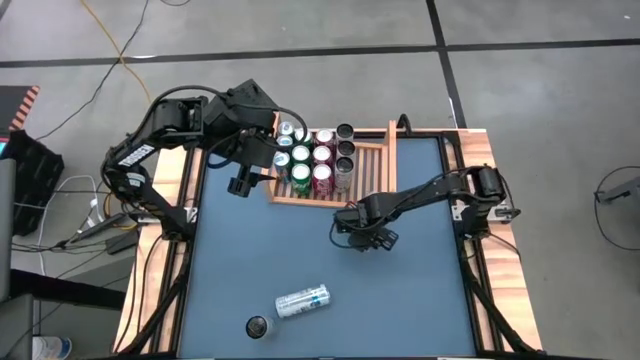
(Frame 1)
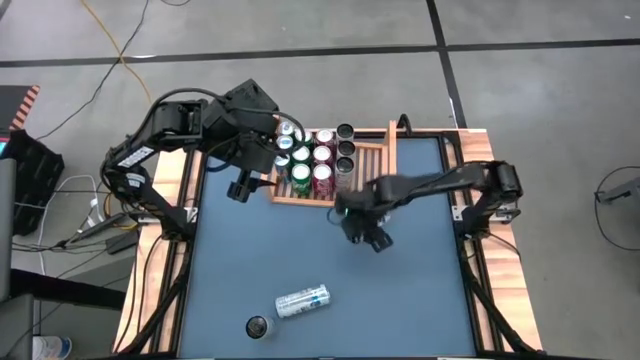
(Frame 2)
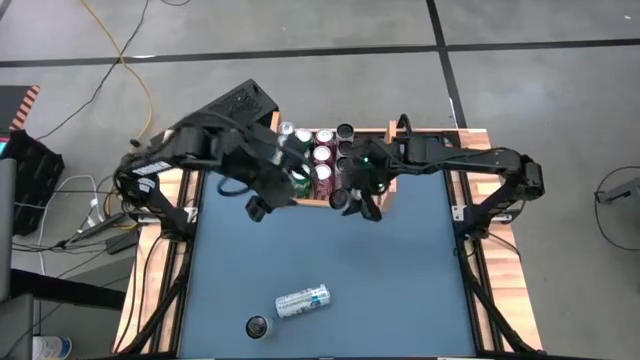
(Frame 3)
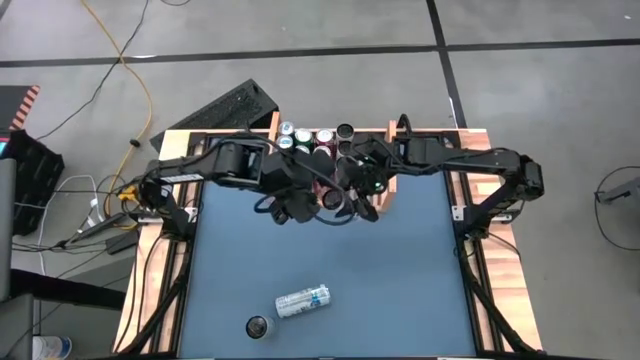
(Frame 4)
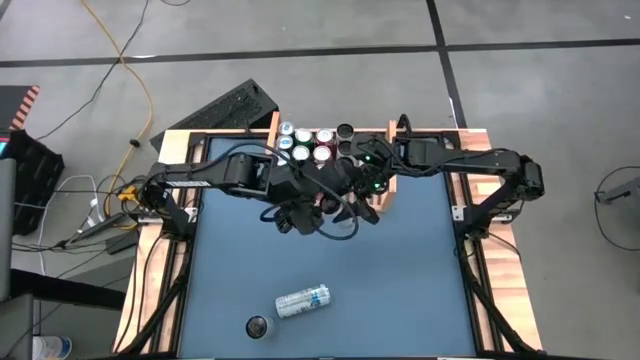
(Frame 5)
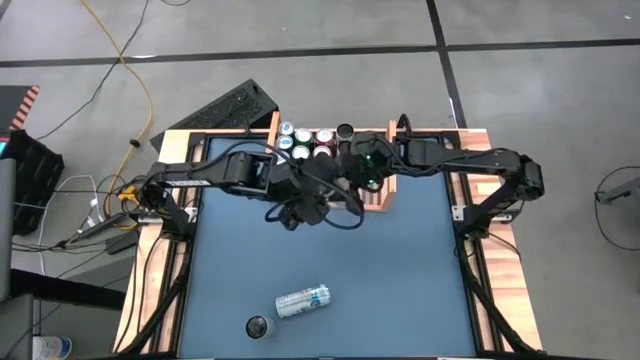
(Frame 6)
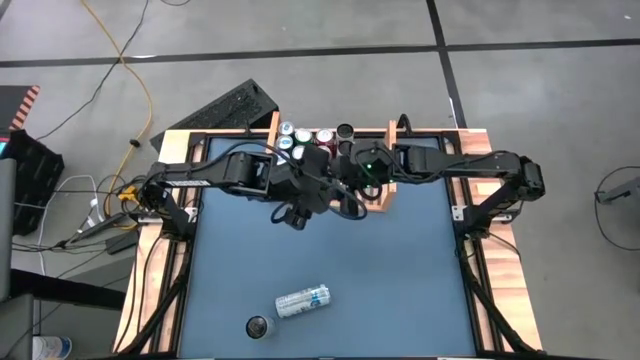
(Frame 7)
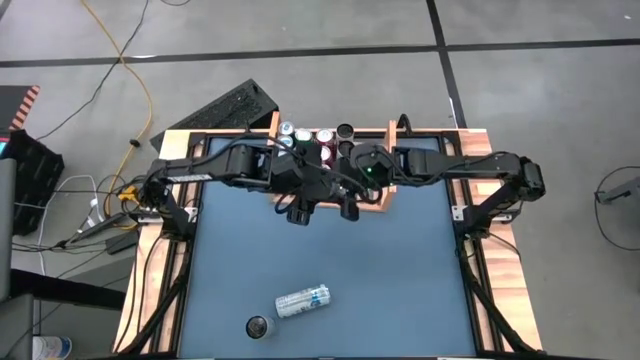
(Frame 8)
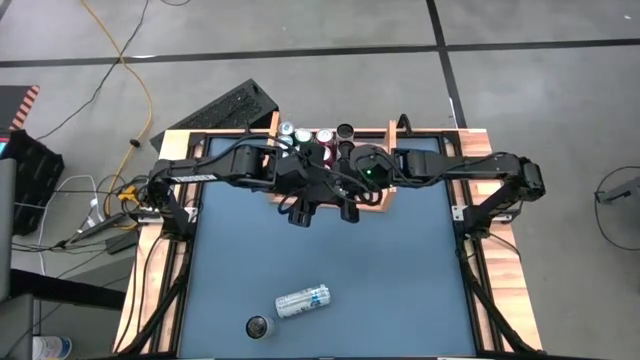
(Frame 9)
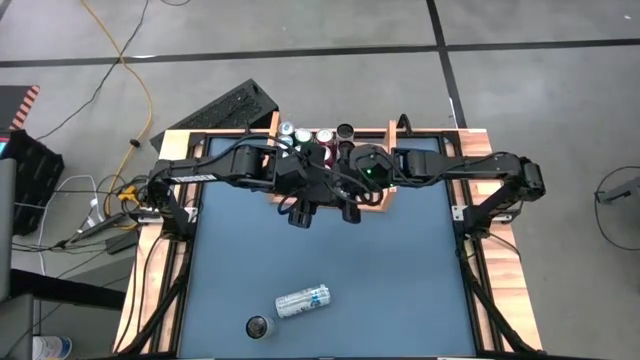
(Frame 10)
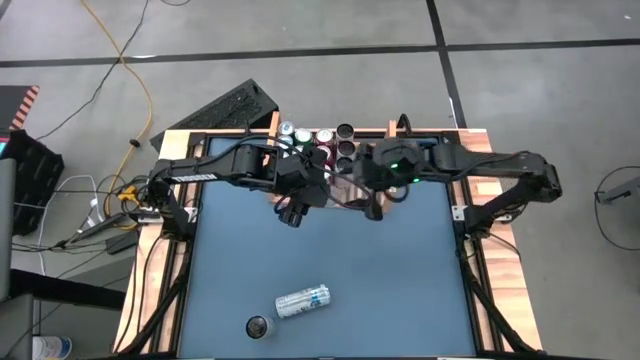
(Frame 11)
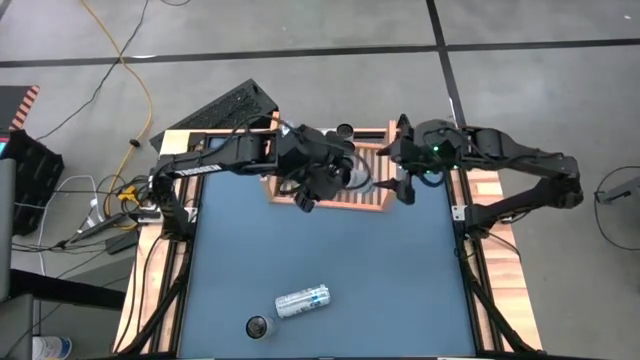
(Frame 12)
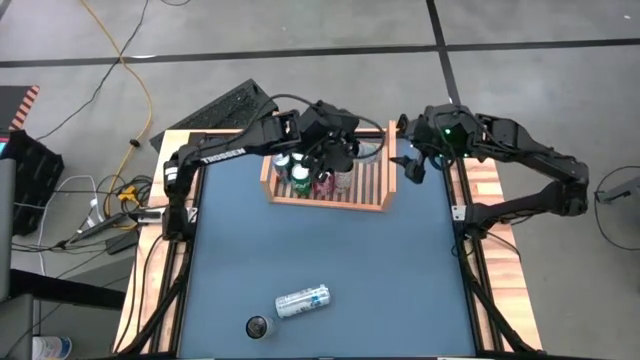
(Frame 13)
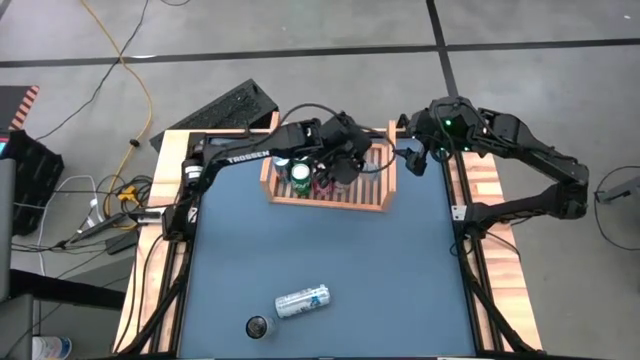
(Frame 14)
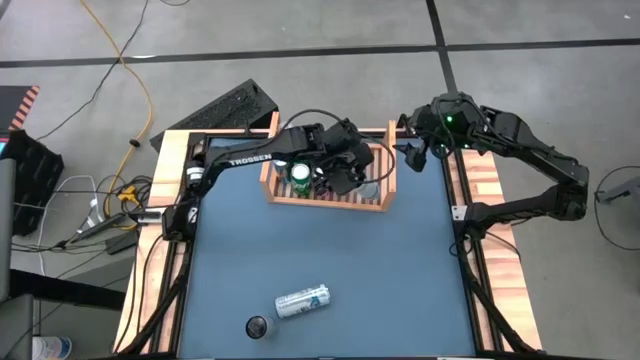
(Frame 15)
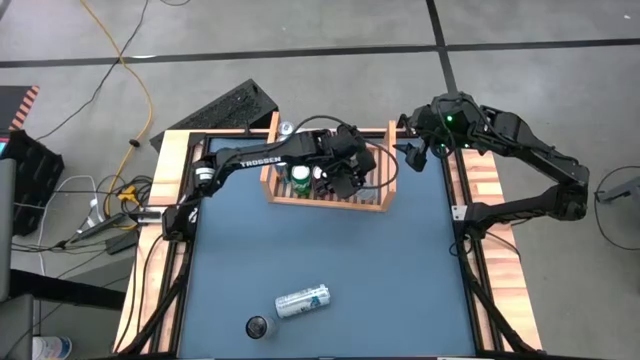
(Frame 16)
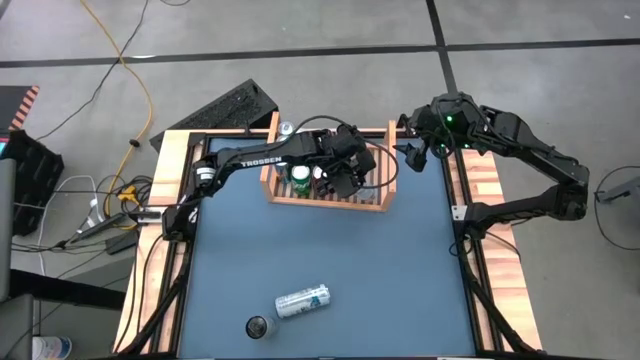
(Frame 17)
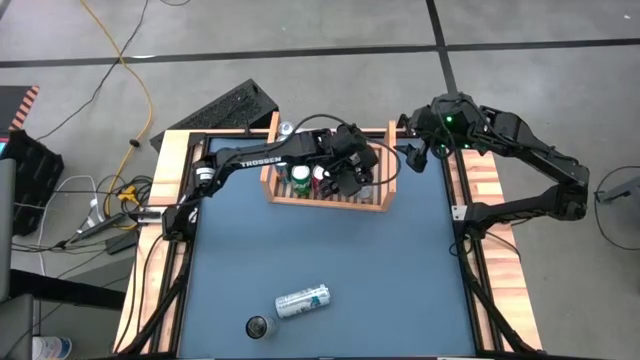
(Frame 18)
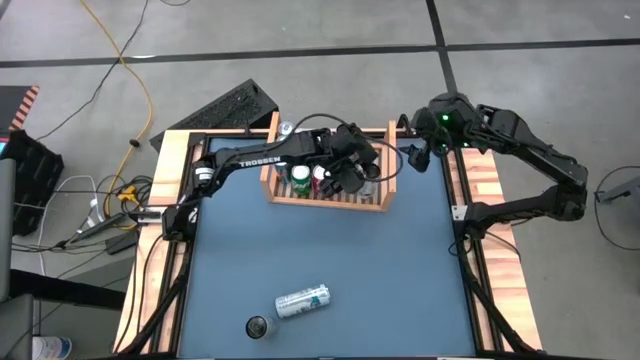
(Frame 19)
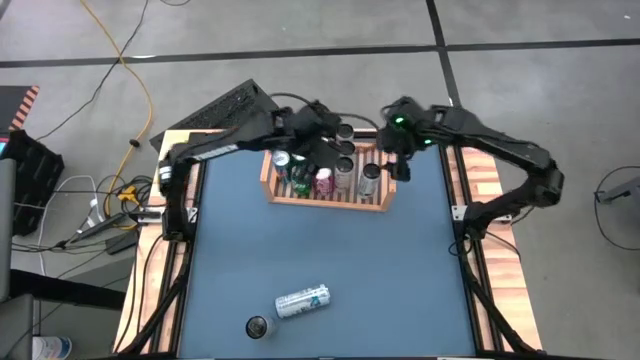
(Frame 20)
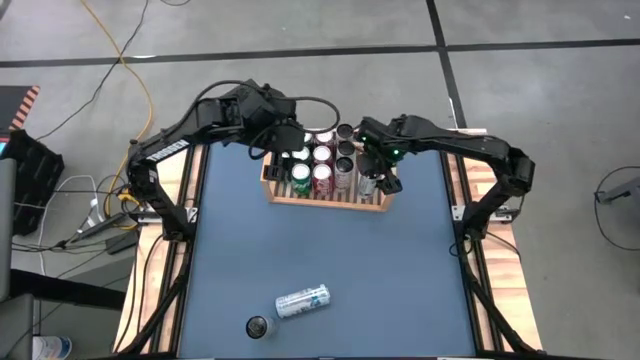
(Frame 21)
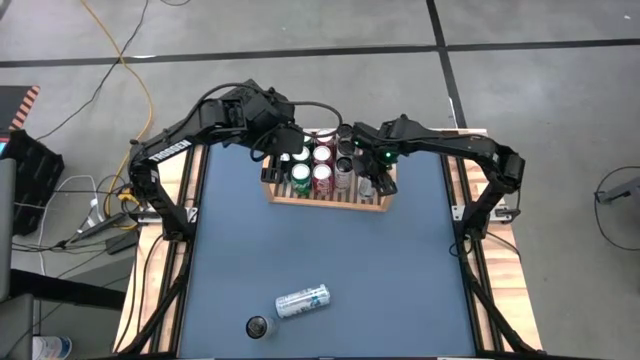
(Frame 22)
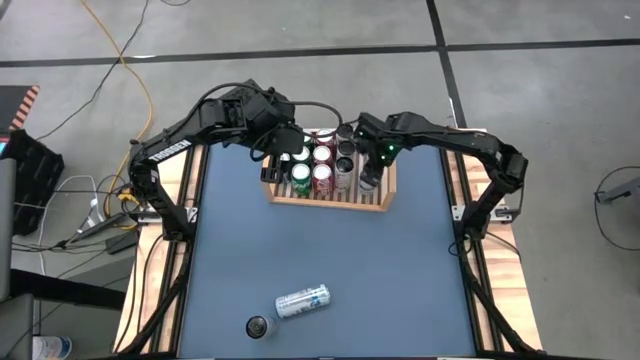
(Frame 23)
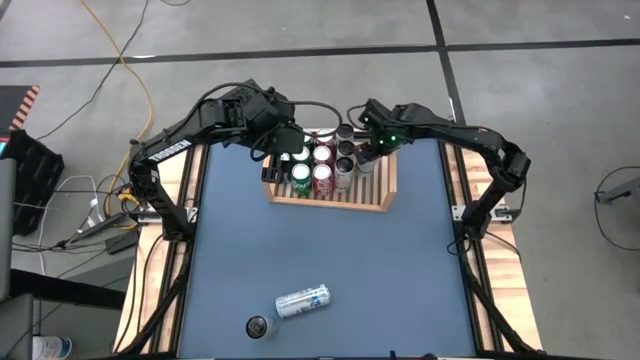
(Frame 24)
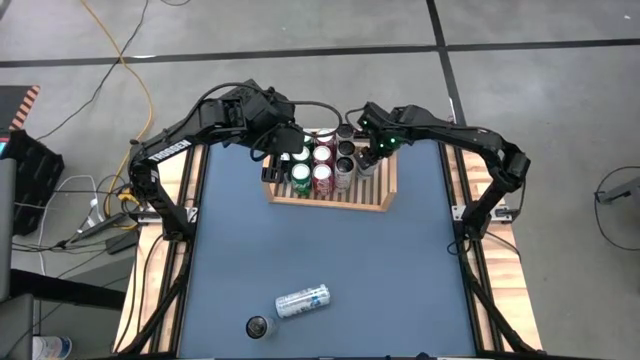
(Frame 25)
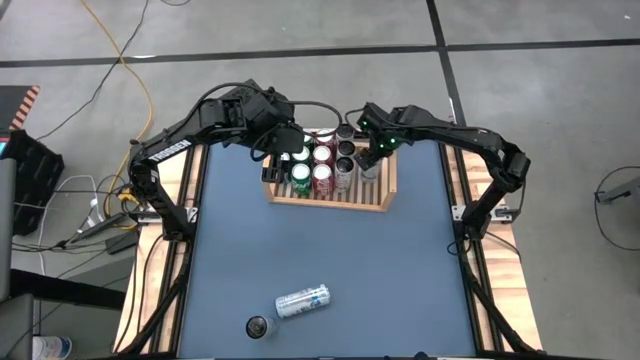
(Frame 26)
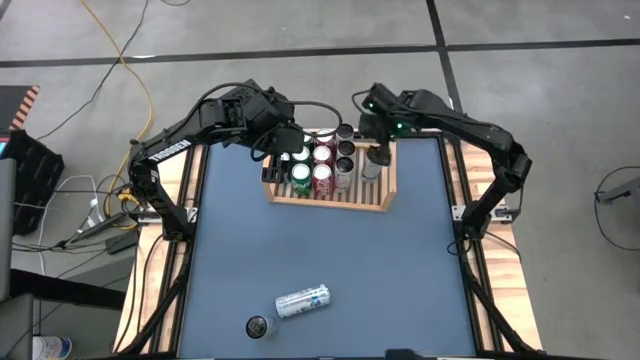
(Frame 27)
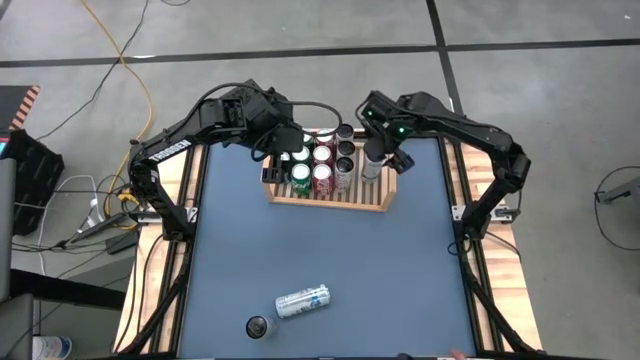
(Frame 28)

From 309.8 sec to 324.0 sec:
Task: Place canned beverage on shelf
Put the light blue soda can on the shelf

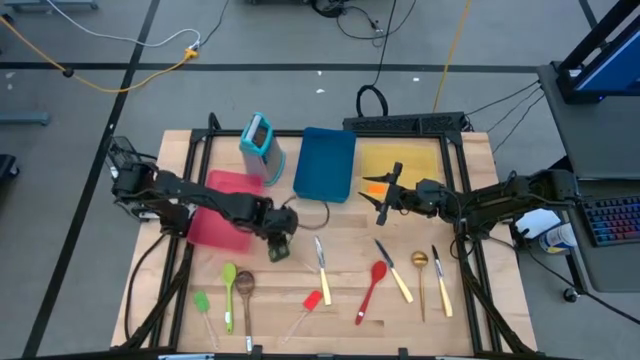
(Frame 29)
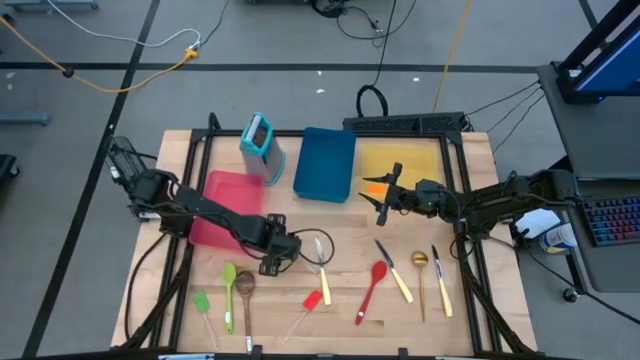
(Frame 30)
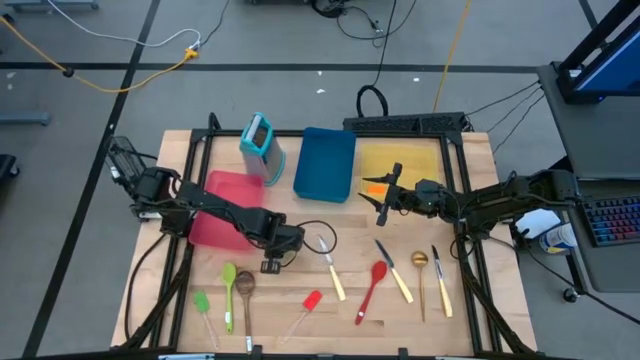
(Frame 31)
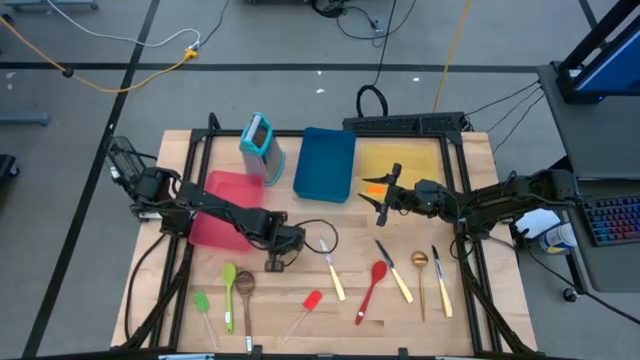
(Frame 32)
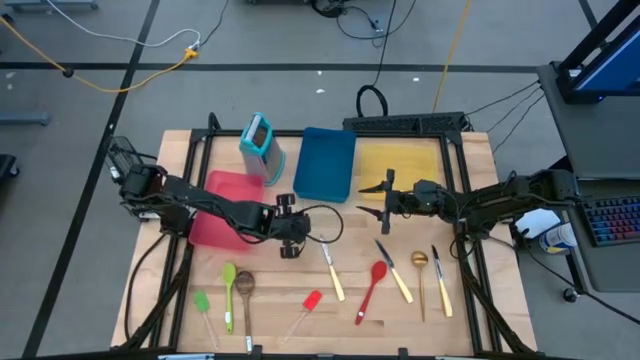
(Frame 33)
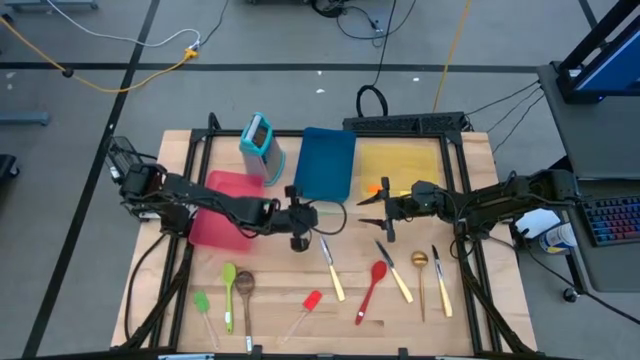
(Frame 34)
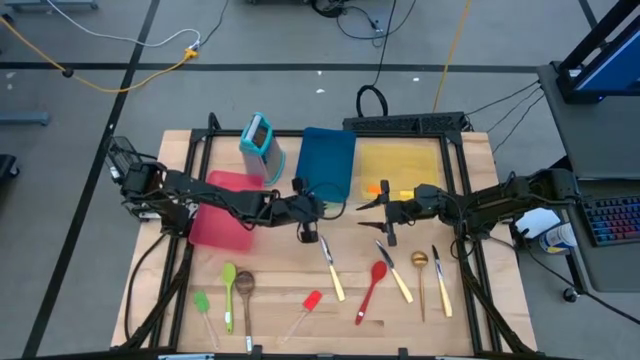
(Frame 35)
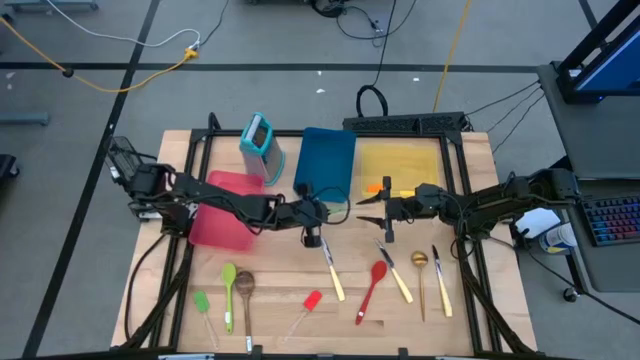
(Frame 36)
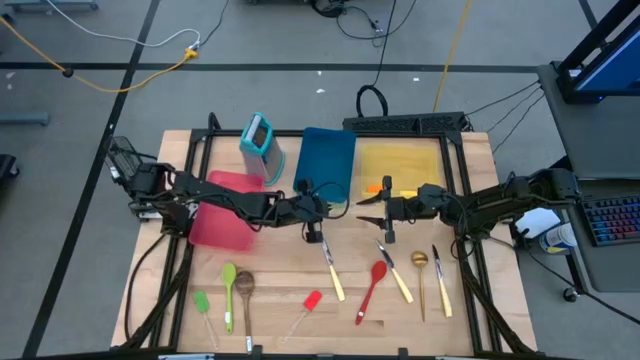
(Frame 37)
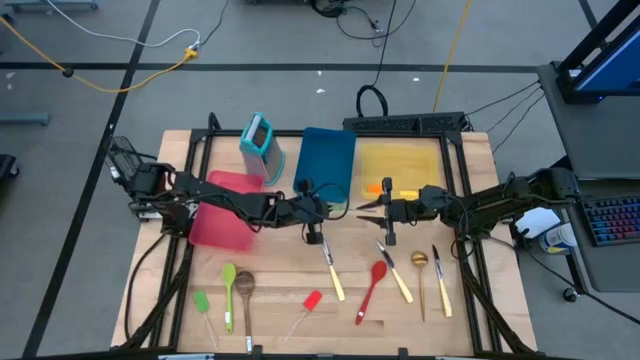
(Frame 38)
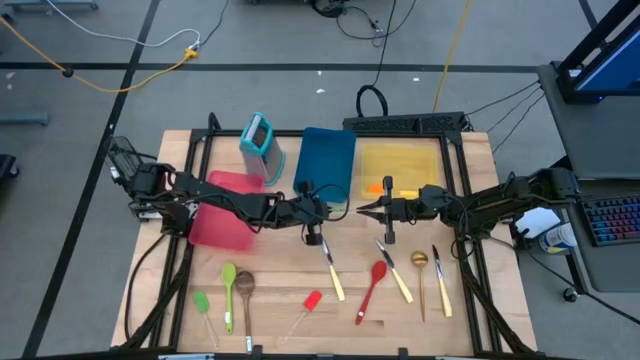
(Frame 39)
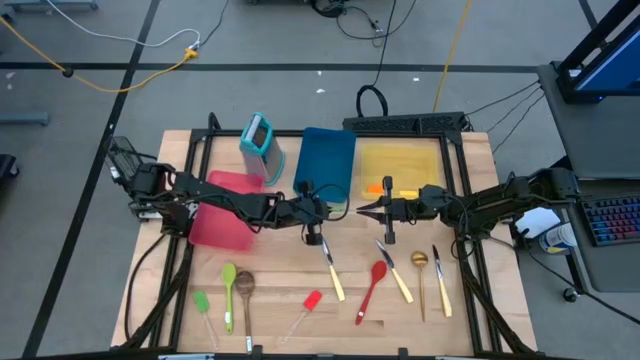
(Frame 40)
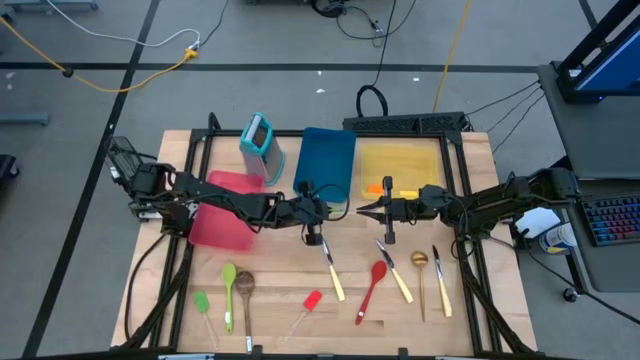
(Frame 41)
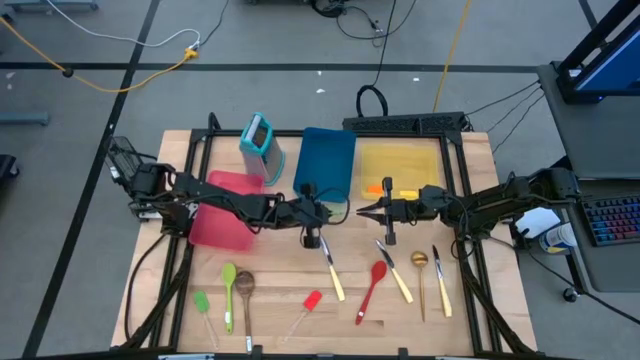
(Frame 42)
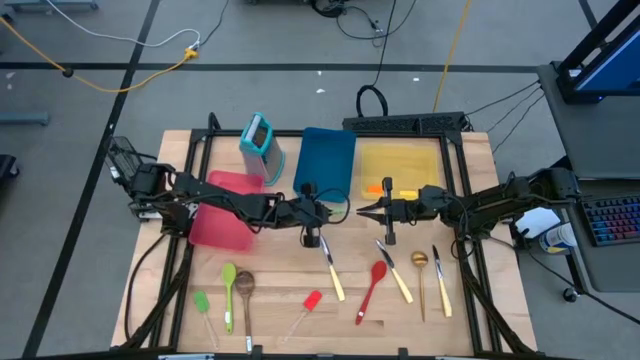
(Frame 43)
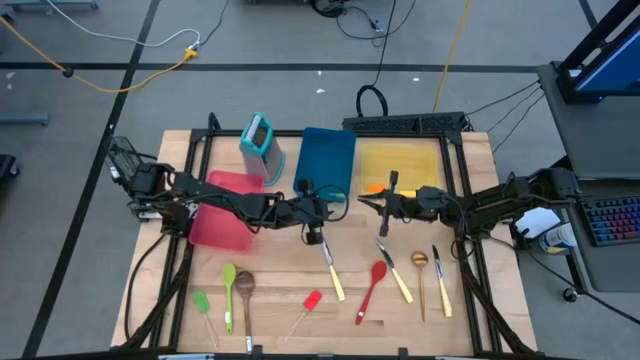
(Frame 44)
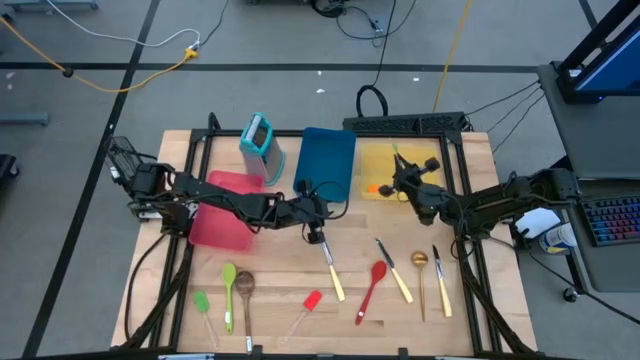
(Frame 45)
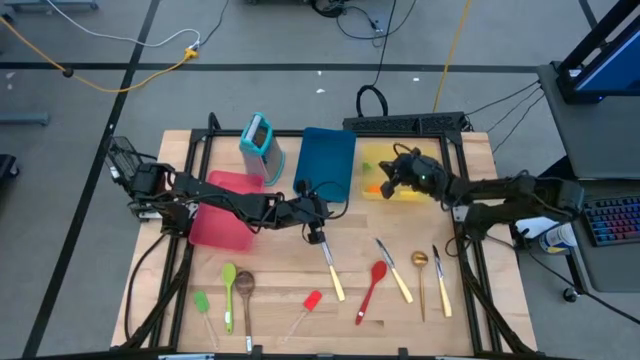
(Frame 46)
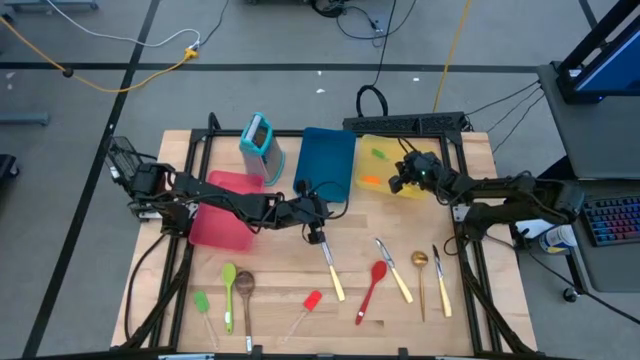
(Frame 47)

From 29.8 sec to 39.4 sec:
Task: Pick & Place Kitchen Items
Put the top green spatula into the yellow bin
